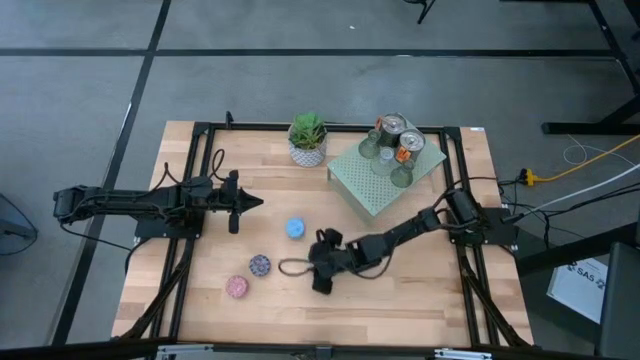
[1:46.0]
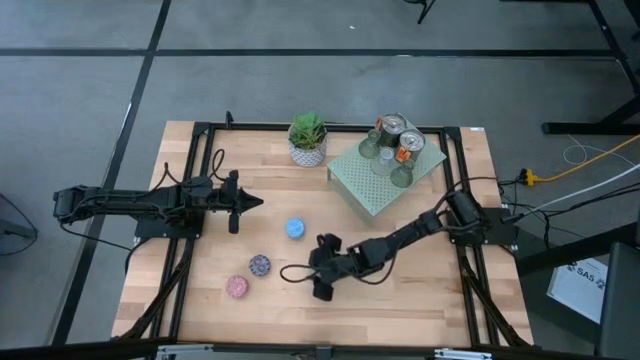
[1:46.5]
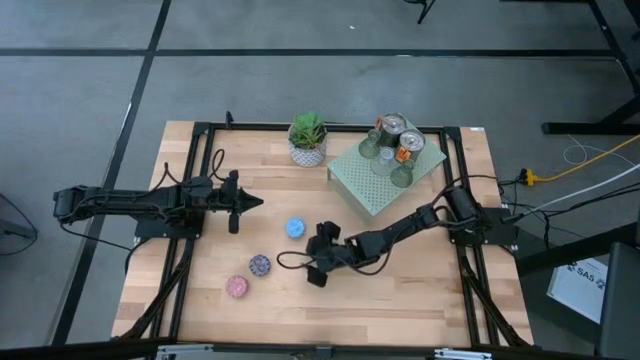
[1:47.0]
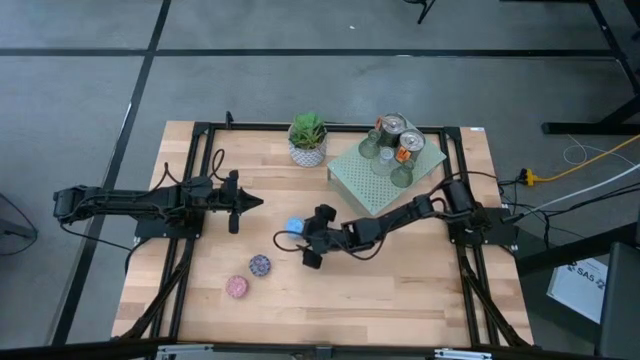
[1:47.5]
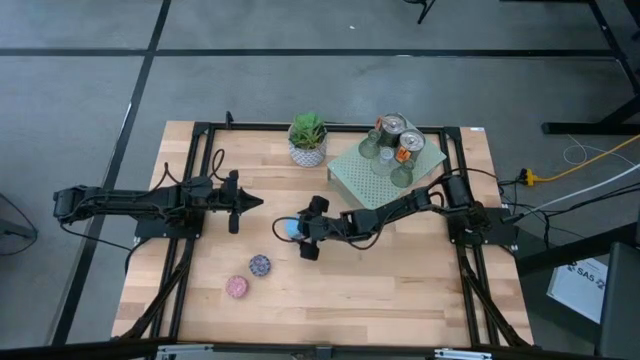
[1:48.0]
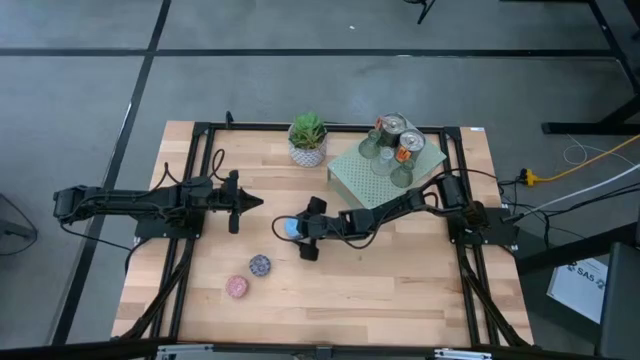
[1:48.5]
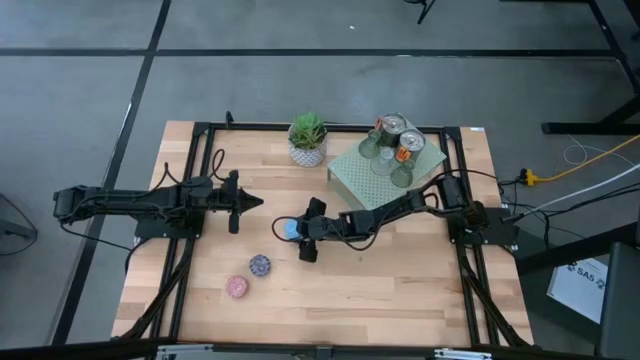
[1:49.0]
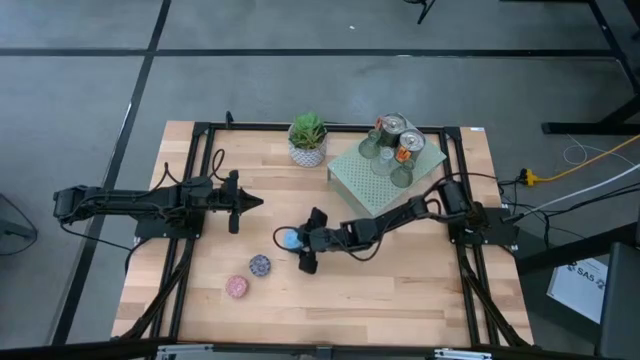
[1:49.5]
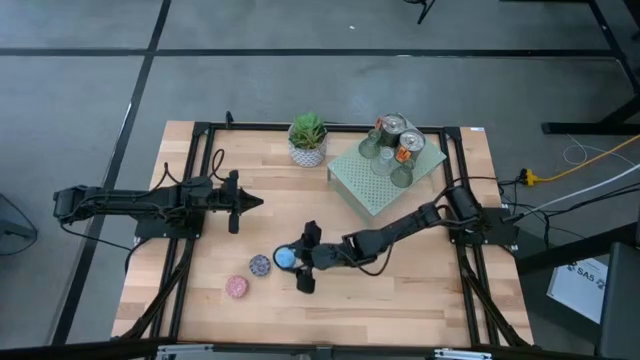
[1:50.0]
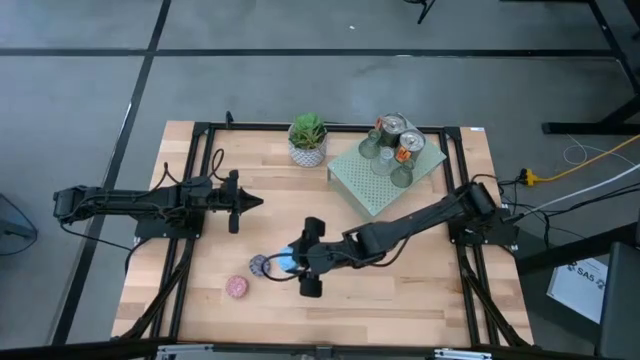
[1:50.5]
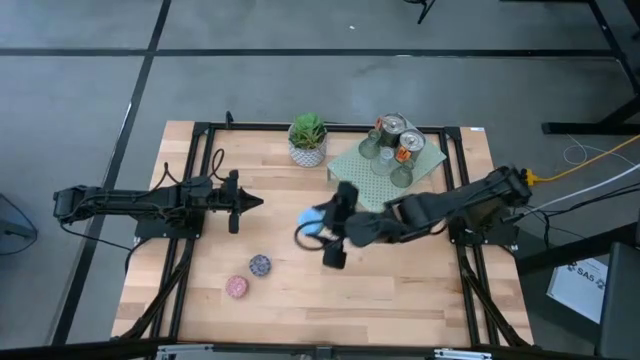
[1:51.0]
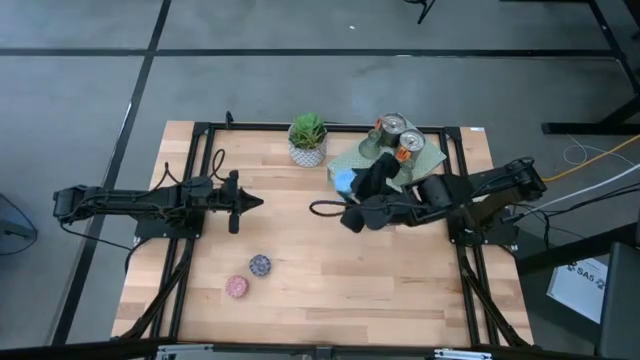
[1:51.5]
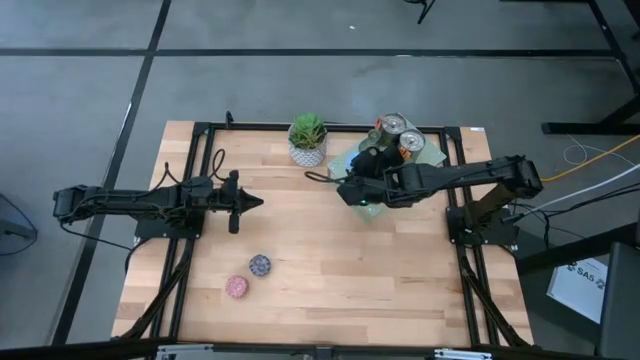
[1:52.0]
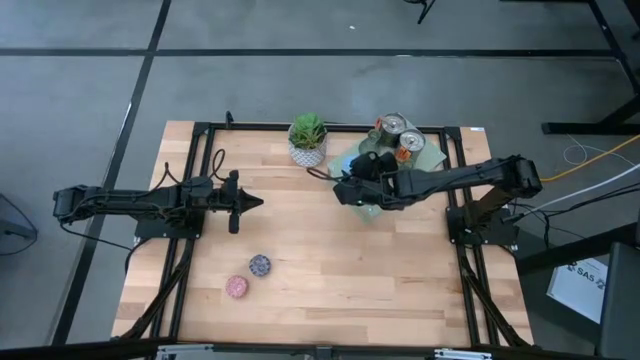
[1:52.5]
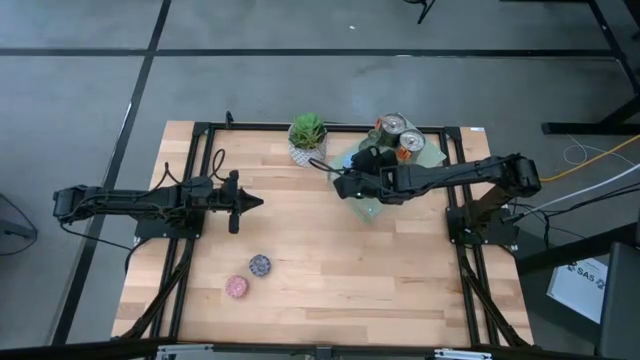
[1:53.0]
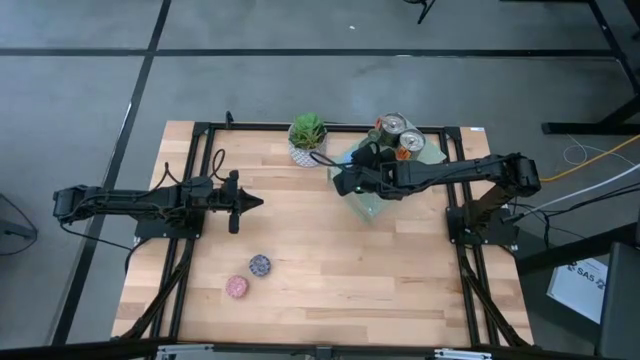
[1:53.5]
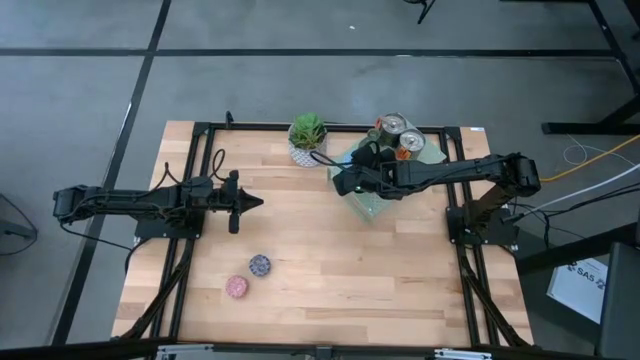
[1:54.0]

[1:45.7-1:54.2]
Task: Pick & Place candle stick holders
Put the blue scented candle on the shelf

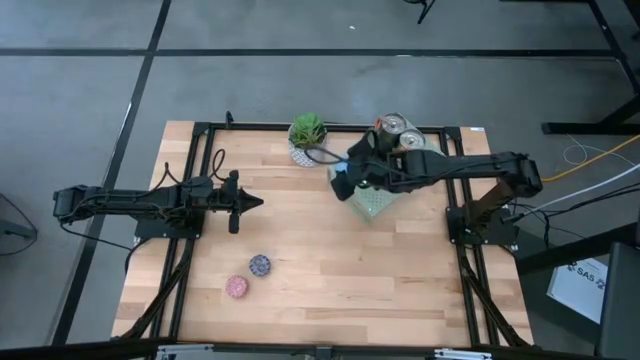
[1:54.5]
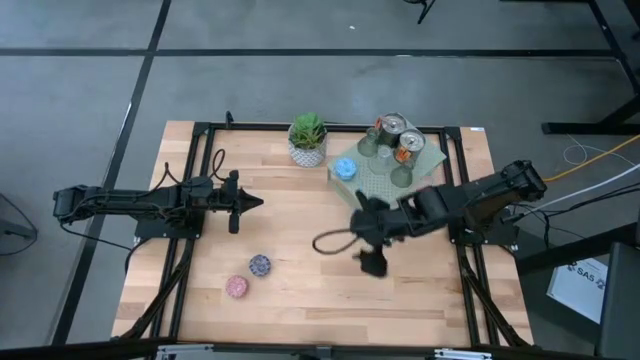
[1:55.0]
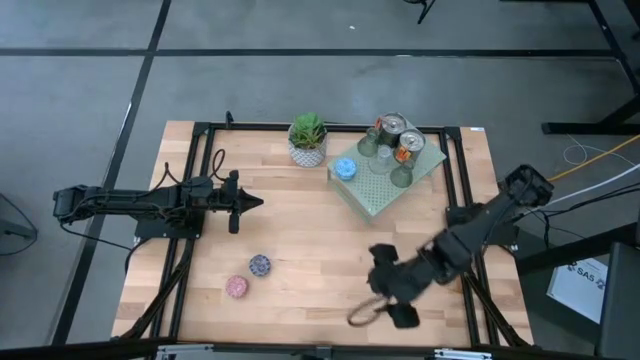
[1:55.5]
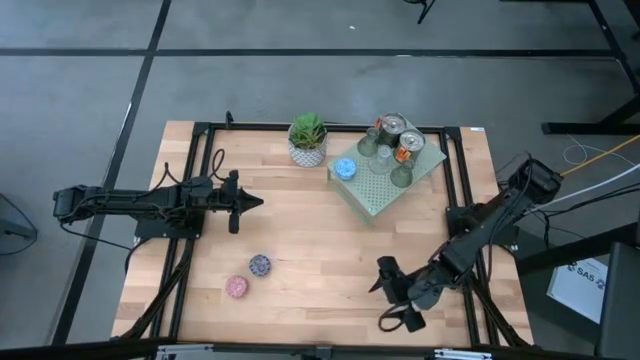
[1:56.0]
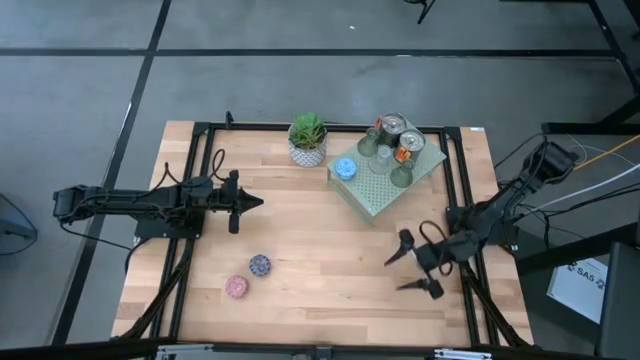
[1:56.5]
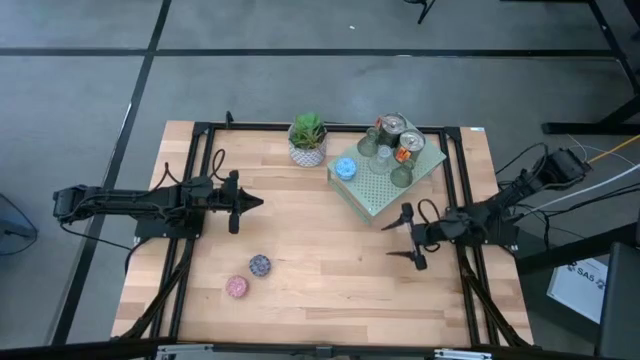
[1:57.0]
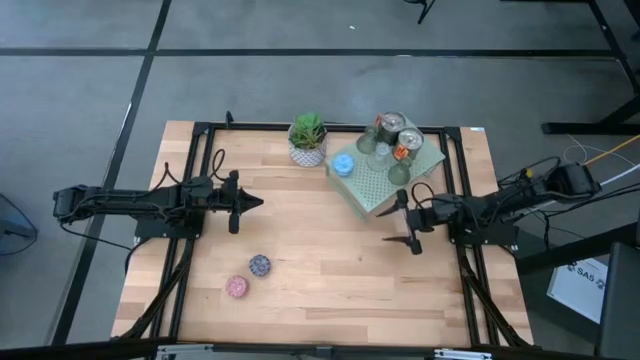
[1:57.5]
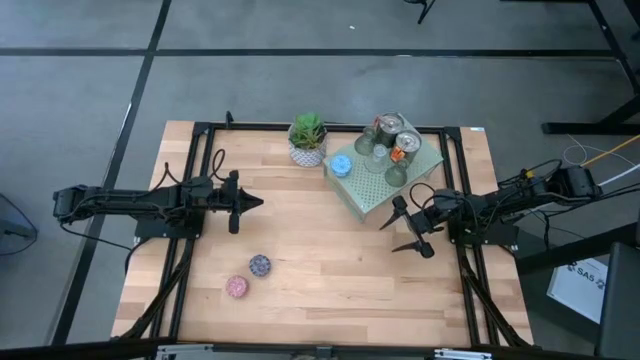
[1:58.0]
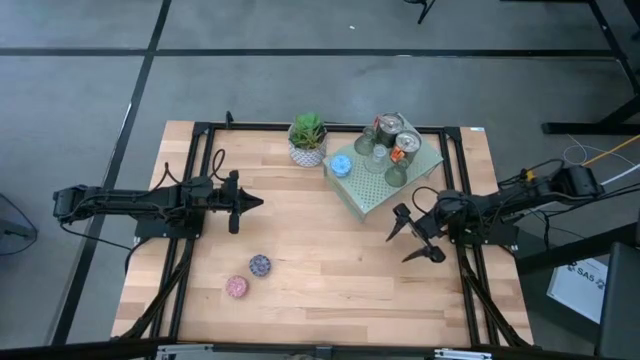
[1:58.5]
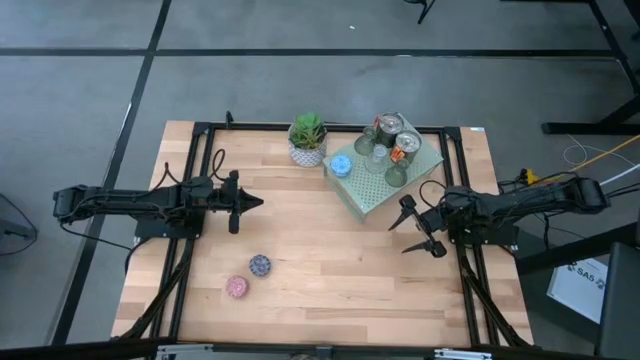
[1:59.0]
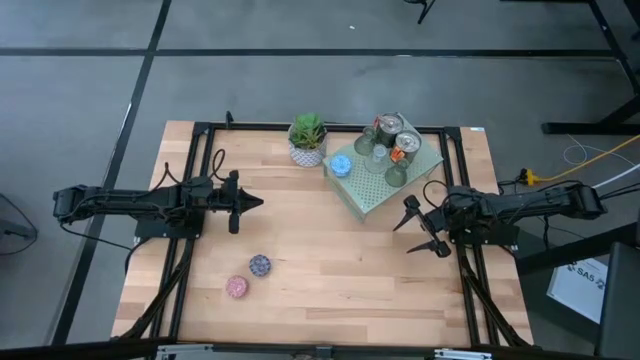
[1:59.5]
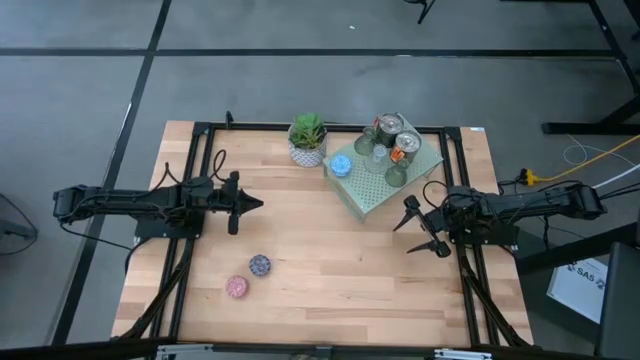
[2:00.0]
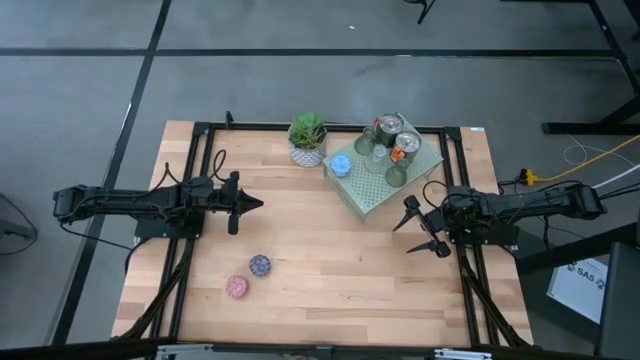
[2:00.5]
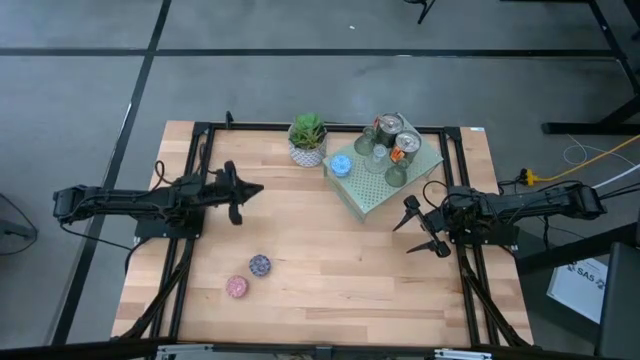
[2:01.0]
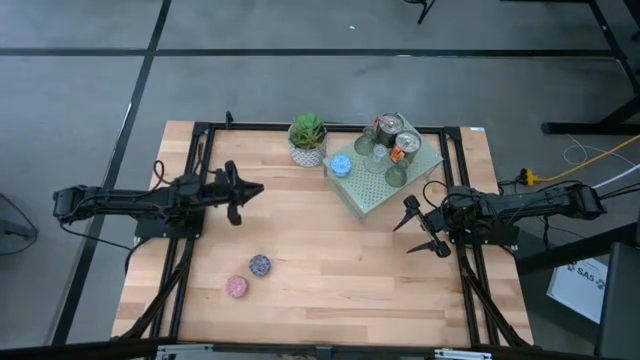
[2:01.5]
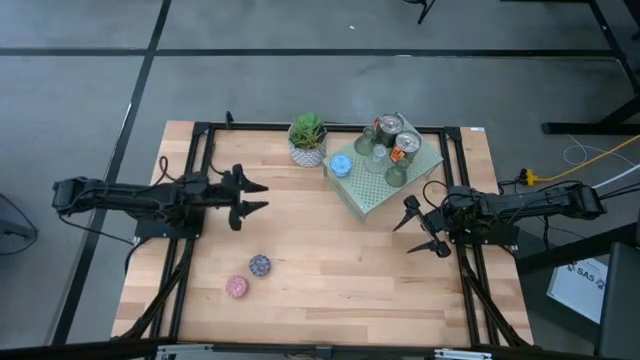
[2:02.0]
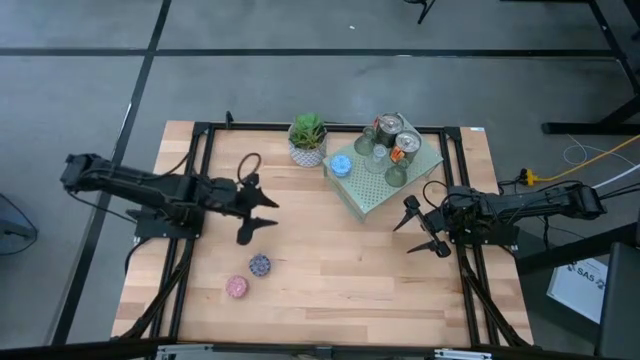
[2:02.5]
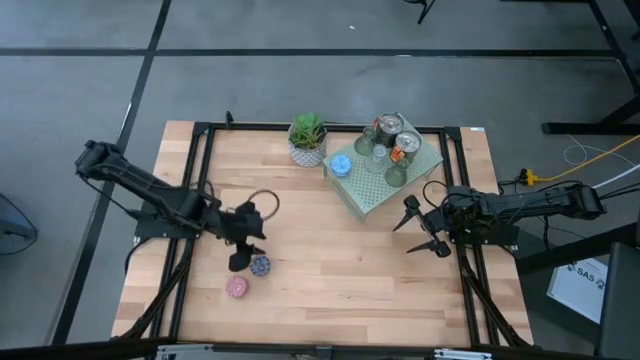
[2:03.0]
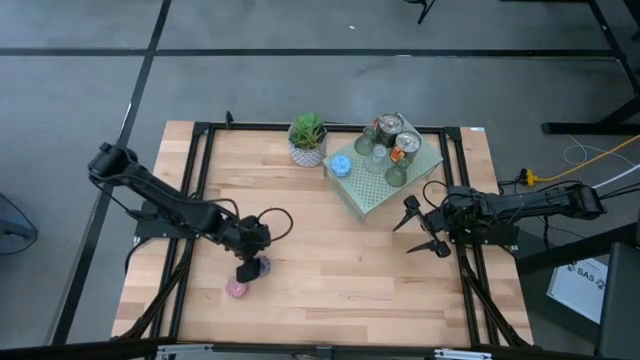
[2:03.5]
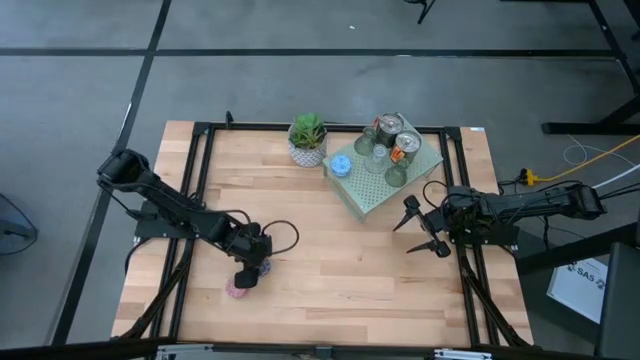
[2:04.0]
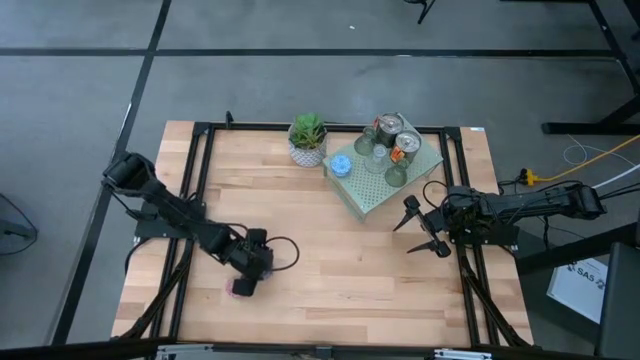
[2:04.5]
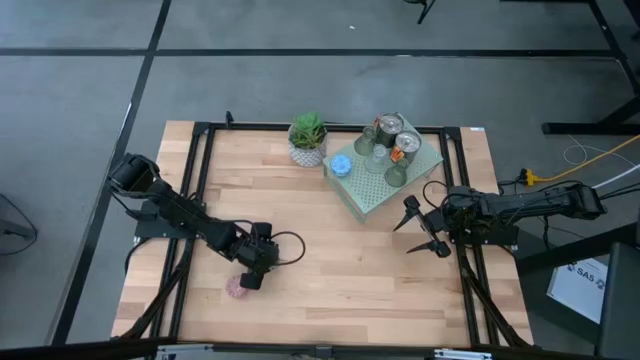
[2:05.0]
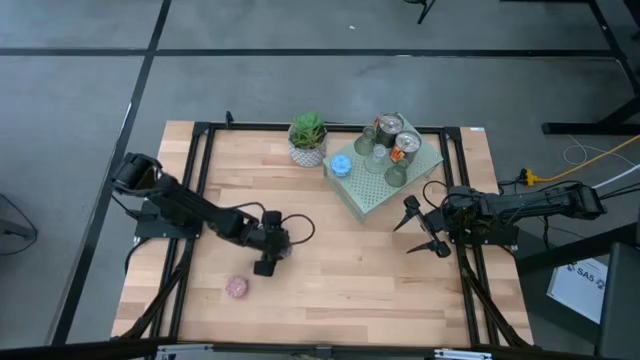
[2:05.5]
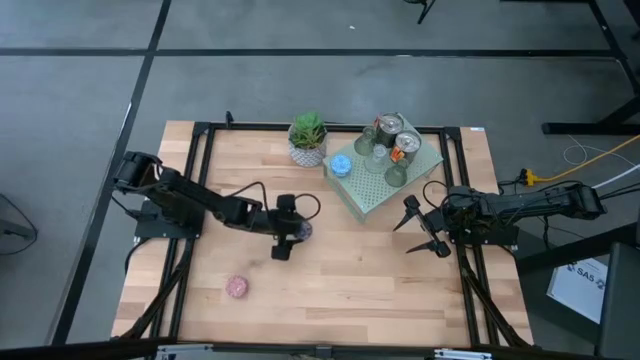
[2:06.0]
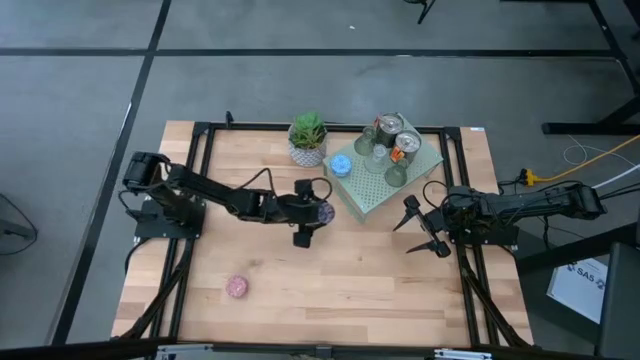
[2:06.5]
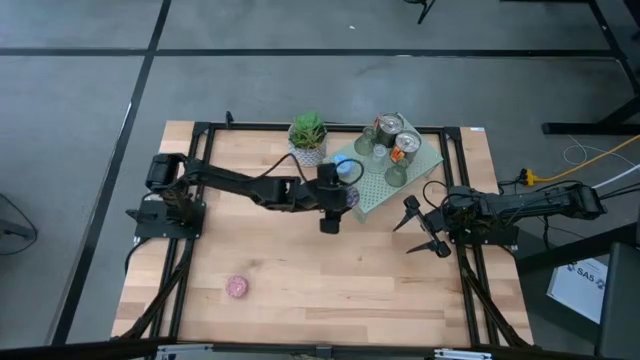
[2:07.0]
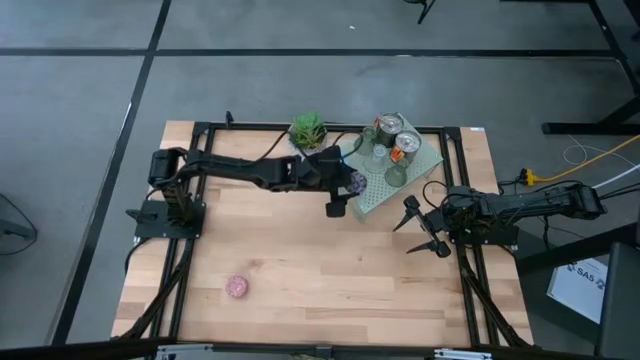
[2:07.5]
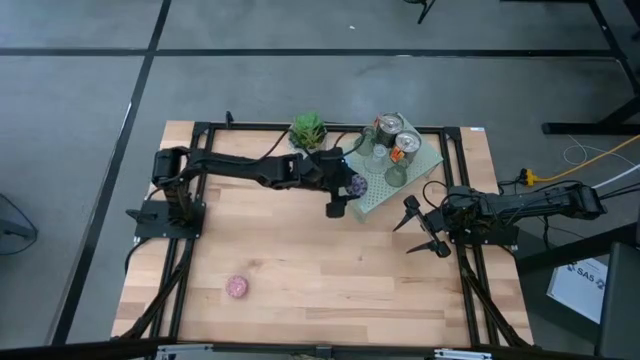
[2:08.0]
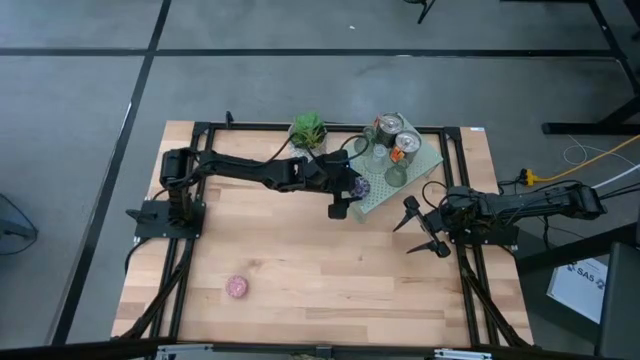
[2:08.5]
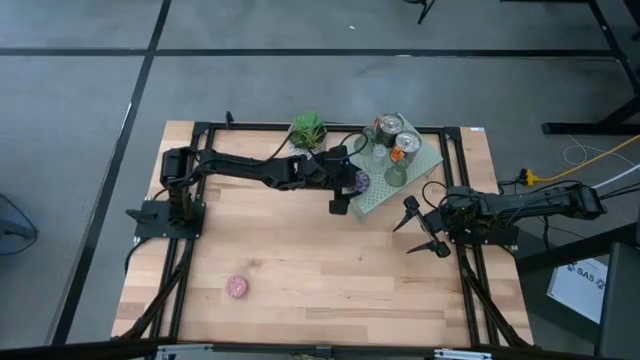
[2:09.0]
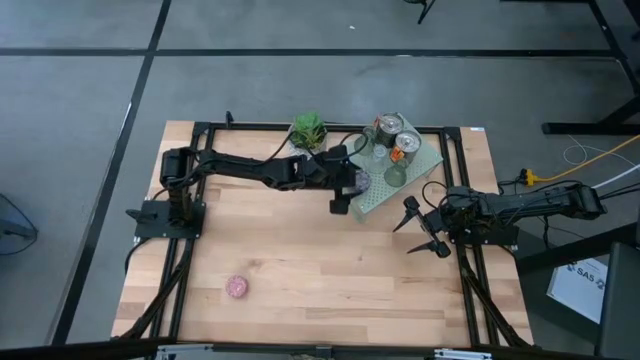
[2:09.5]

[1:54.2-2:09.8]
Align the black and red scented candle with the other blue scented candle on the shelf
